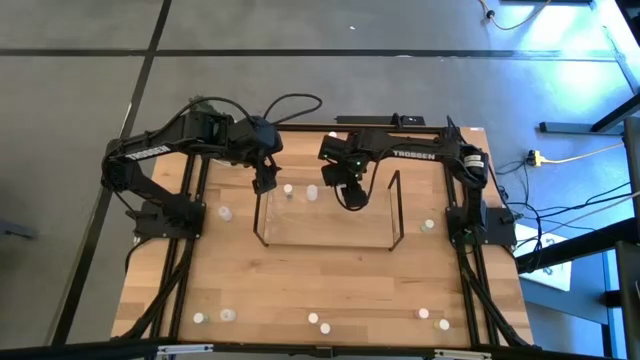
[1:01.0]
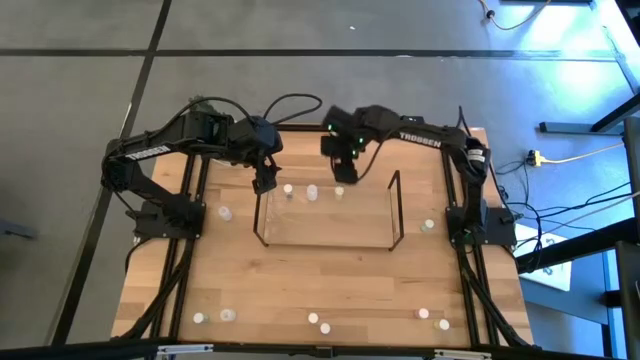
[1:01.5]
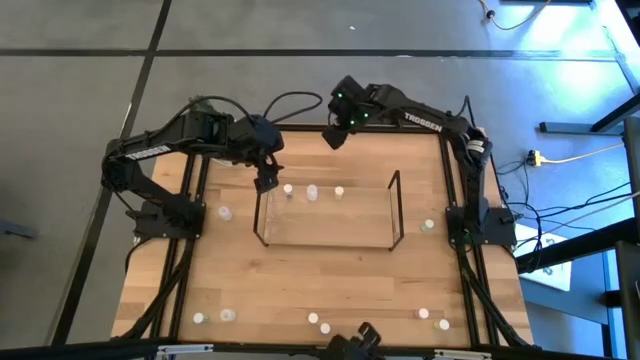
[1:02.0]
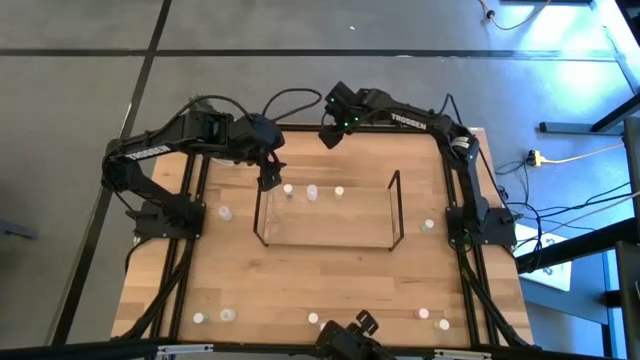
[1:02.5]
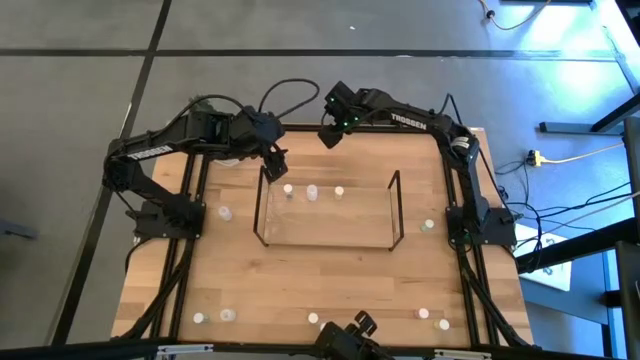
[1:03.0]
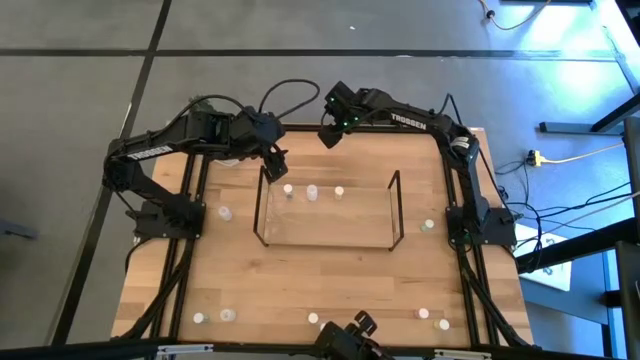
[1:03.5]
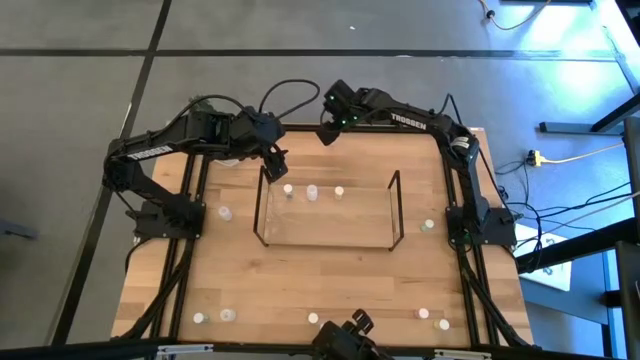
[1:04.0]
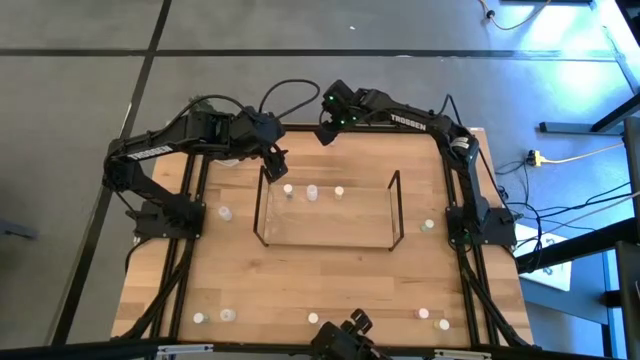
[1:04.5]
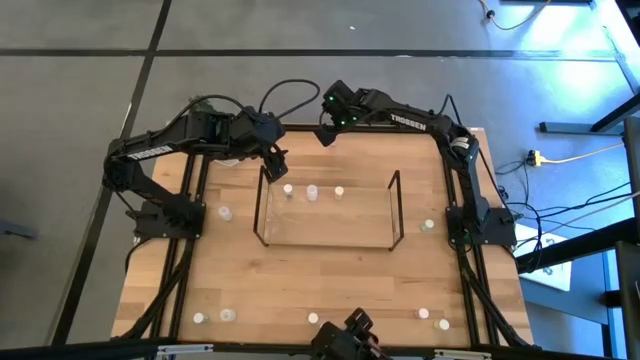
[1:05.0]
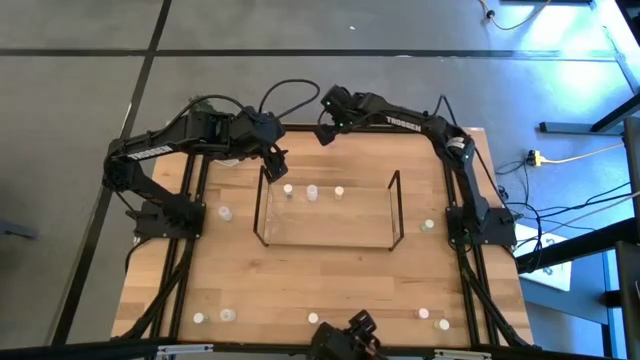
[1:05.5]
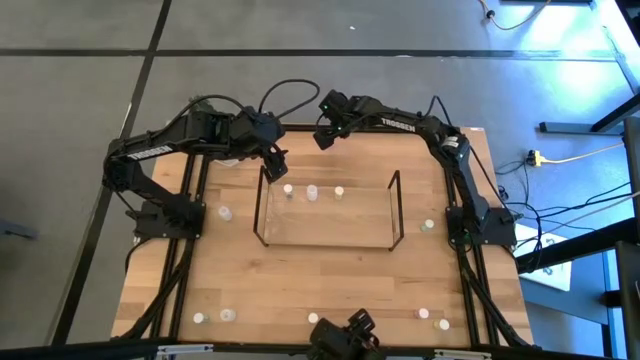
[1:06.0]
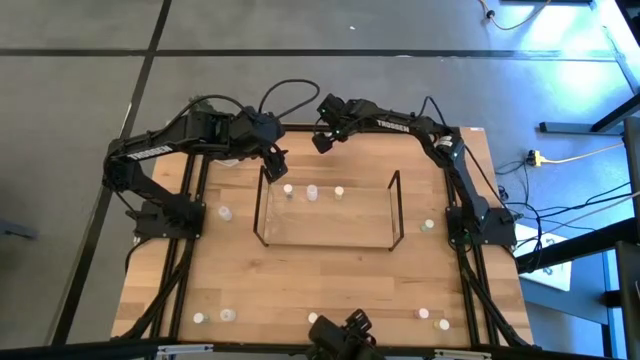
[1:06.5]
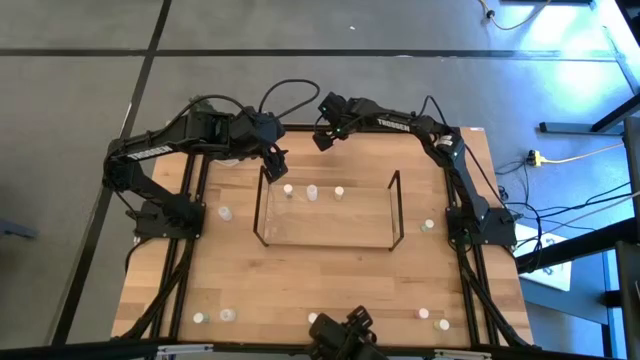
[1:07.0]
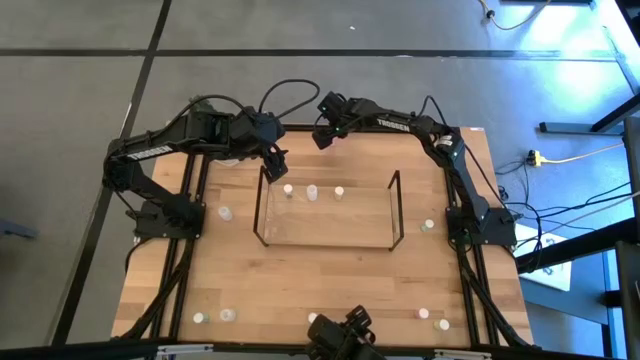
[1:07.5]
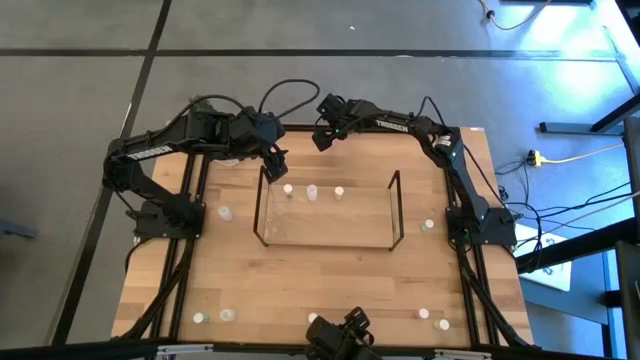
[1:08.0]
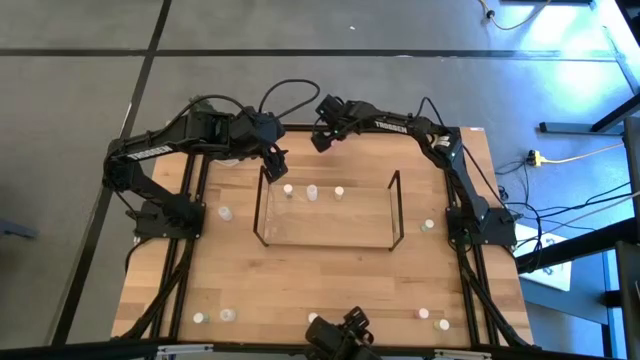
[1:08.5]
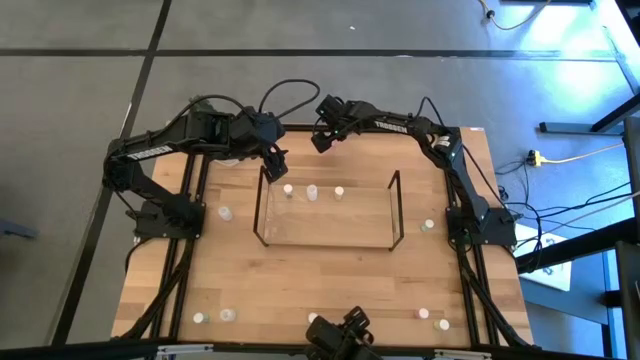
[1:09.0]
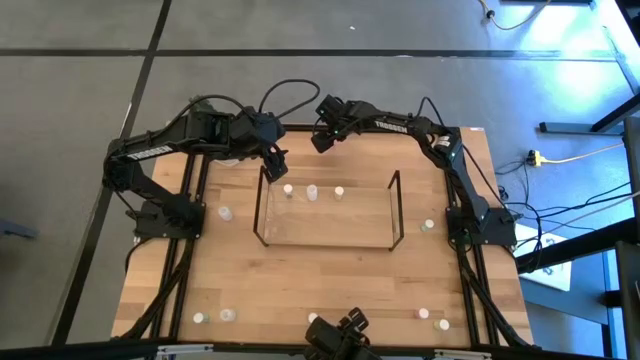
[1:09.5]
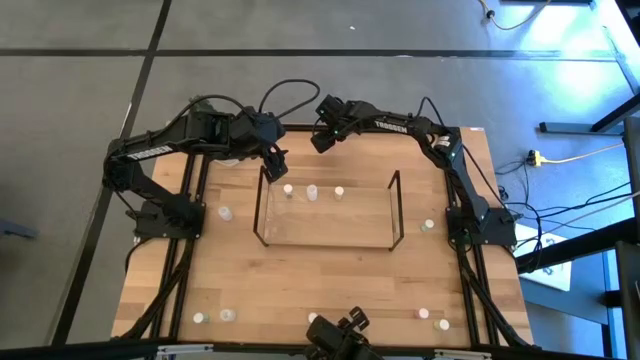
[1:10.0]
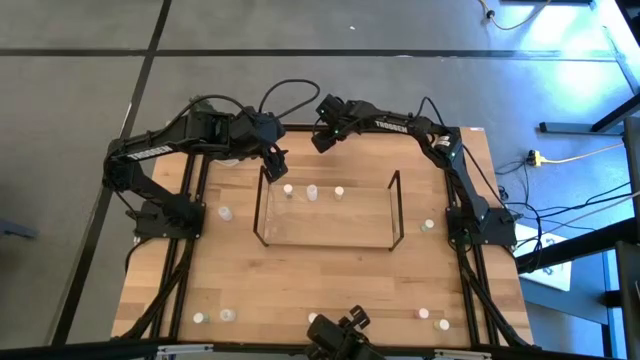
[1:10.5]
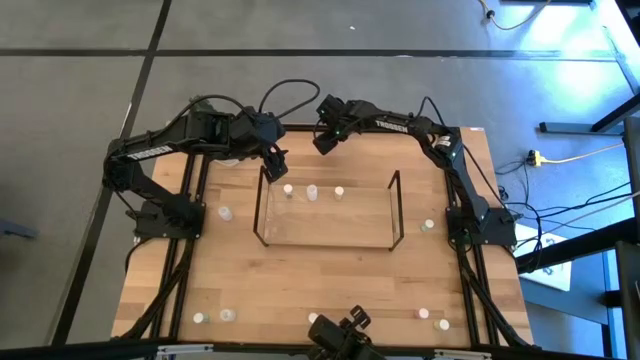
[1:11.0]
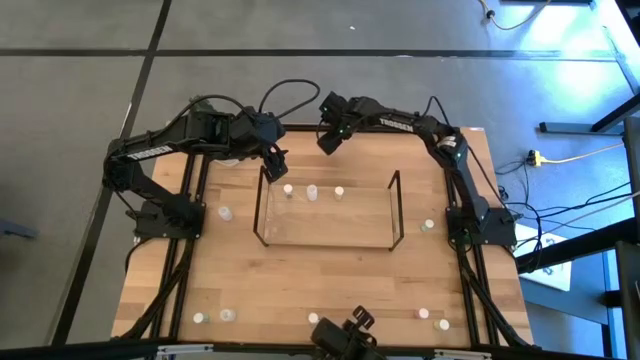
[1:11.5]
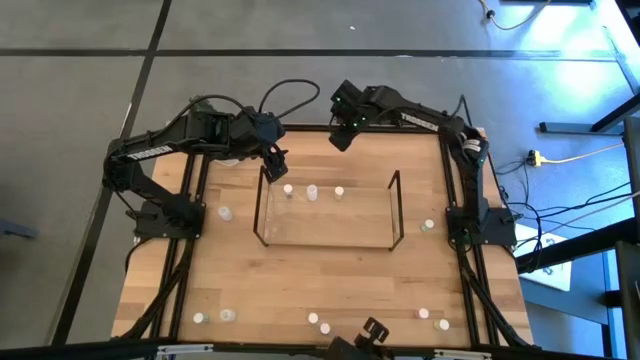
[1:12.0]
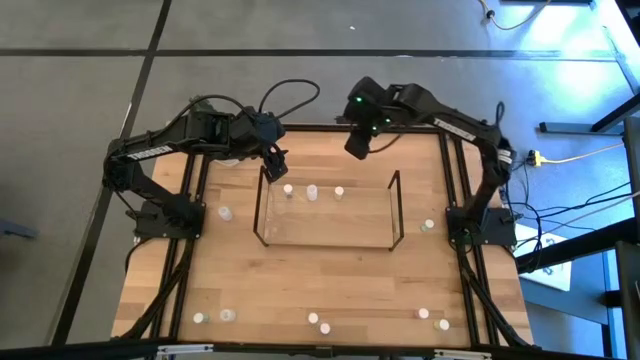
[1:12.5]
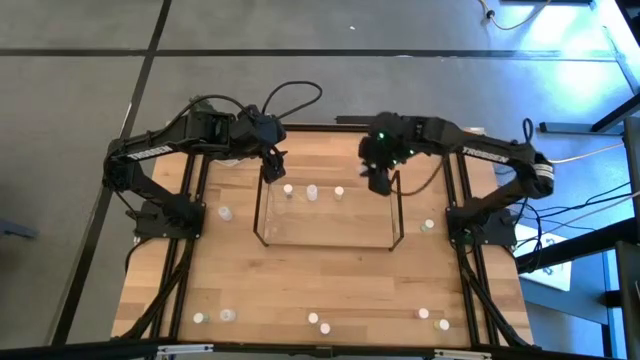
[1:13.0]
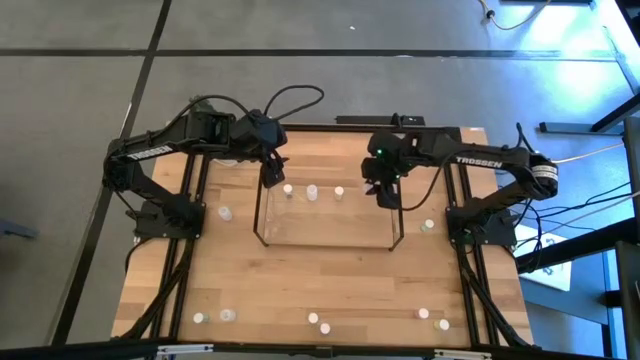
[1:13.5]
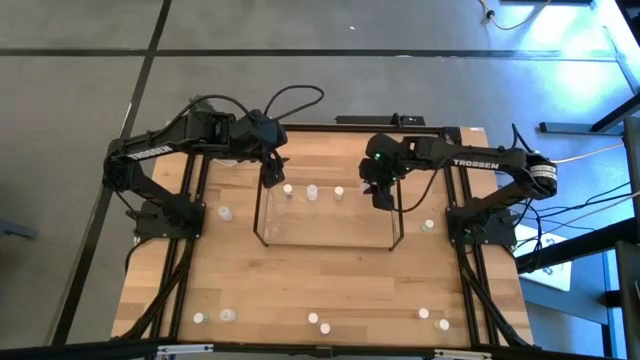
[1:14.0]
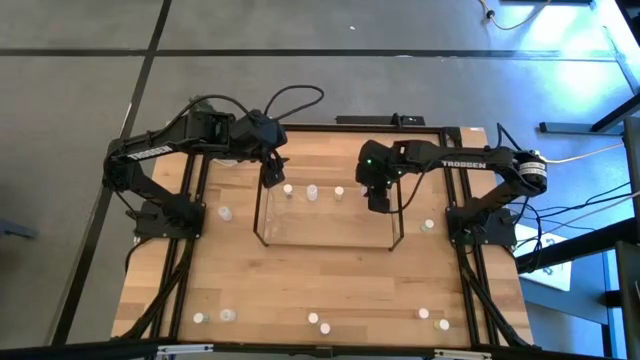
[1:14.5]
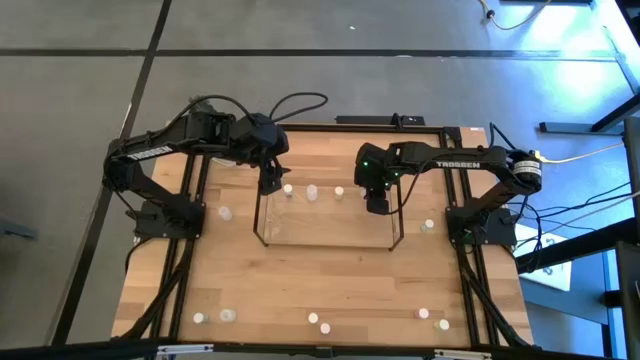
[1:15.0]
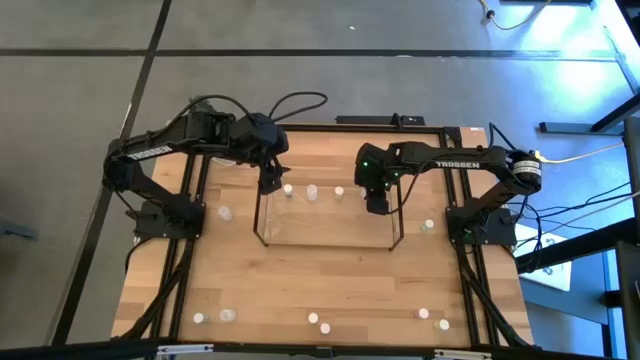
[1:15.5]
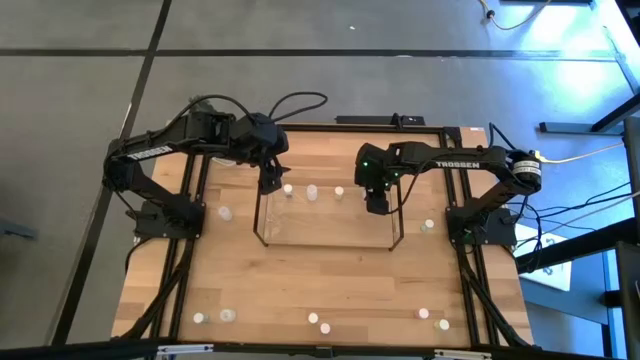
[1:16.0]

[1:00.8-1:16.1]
Task: Pick and place medicine bottles onto shelf by color
Put the top pink pill bottle on the shelf

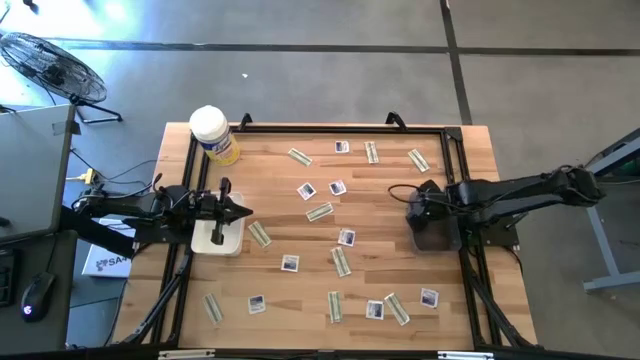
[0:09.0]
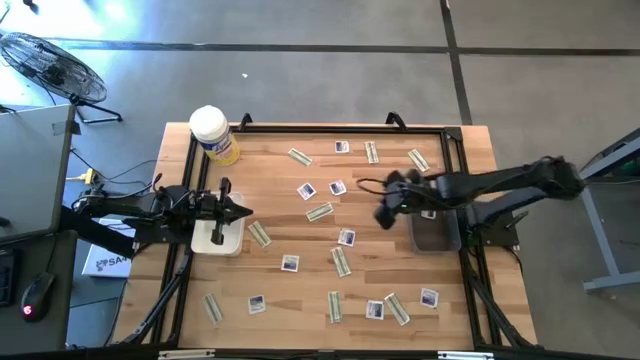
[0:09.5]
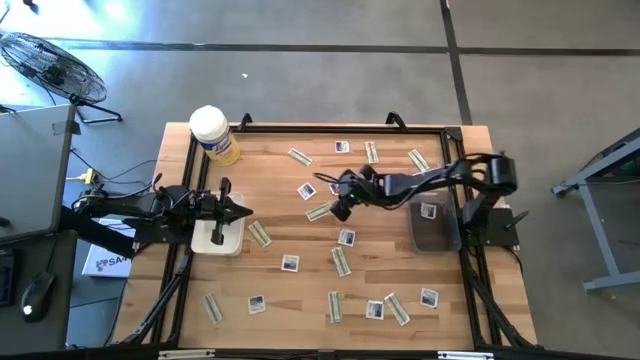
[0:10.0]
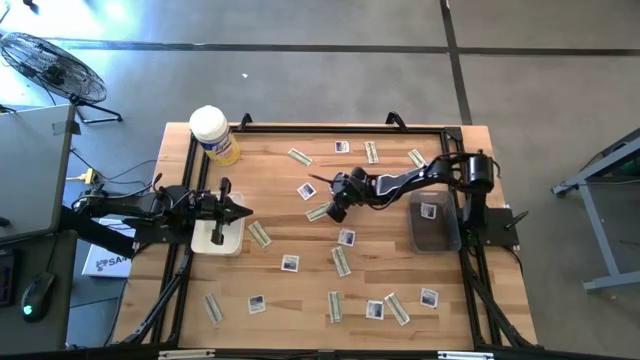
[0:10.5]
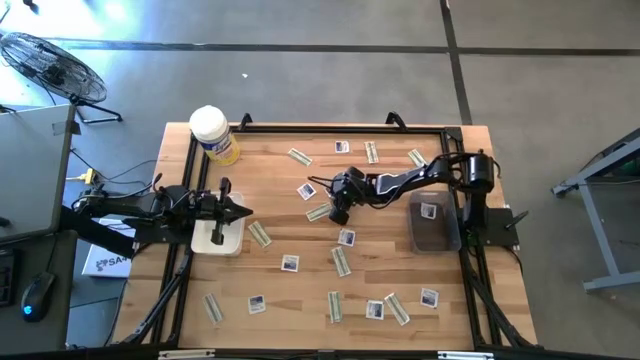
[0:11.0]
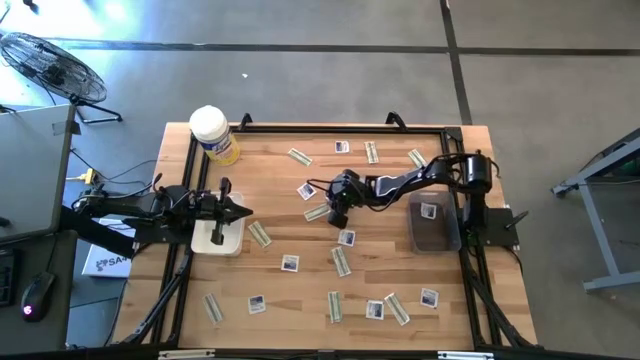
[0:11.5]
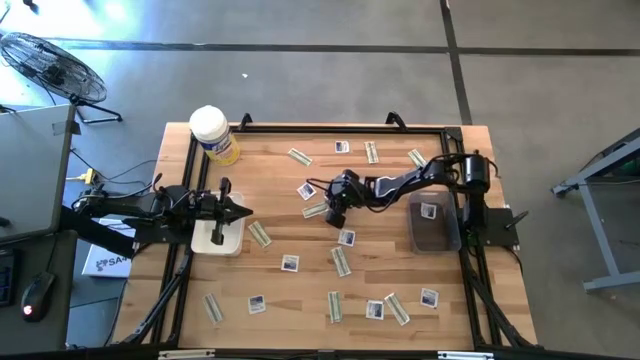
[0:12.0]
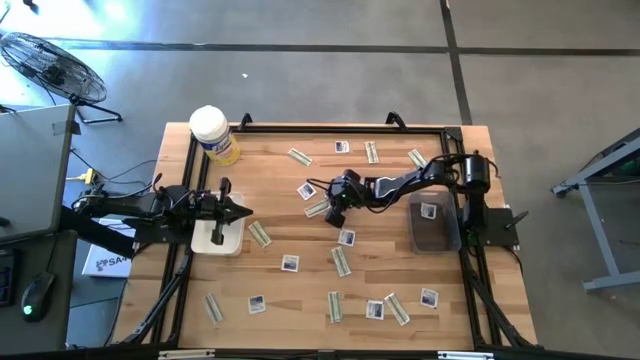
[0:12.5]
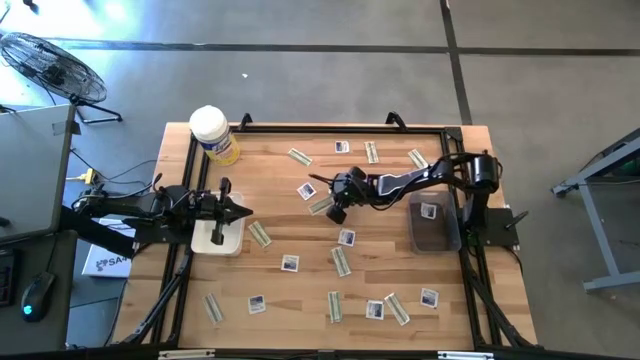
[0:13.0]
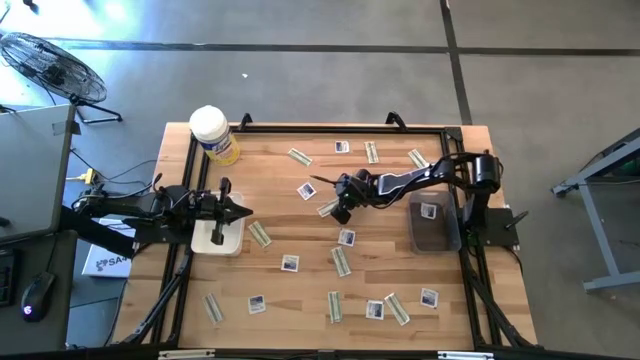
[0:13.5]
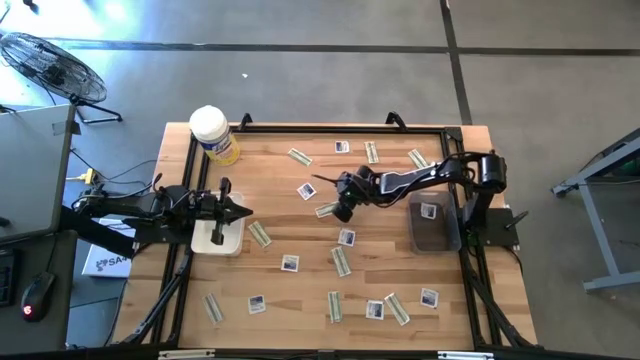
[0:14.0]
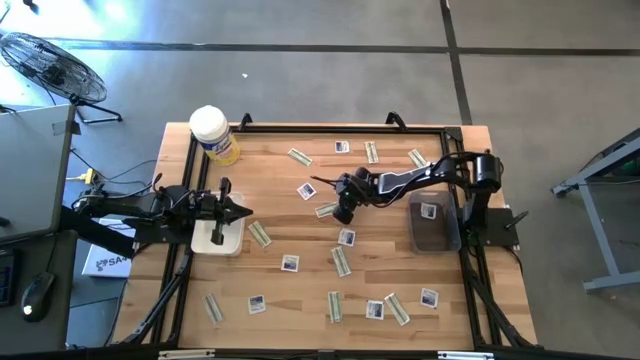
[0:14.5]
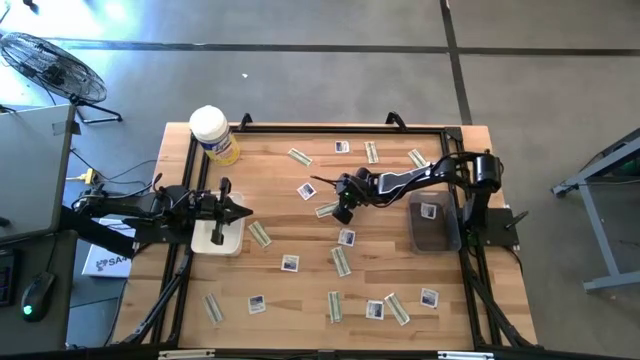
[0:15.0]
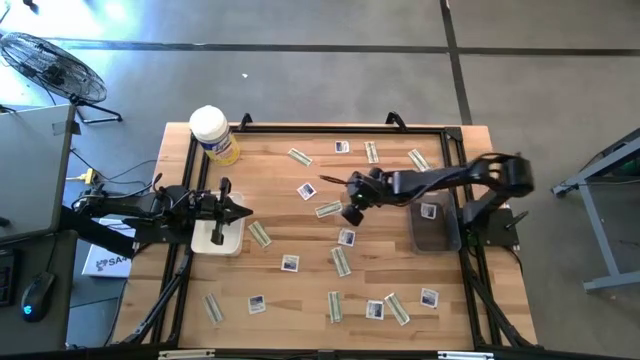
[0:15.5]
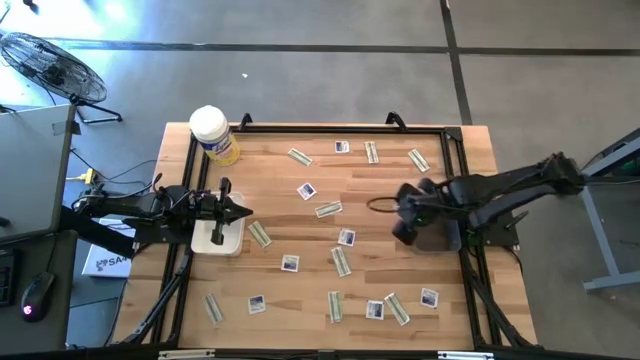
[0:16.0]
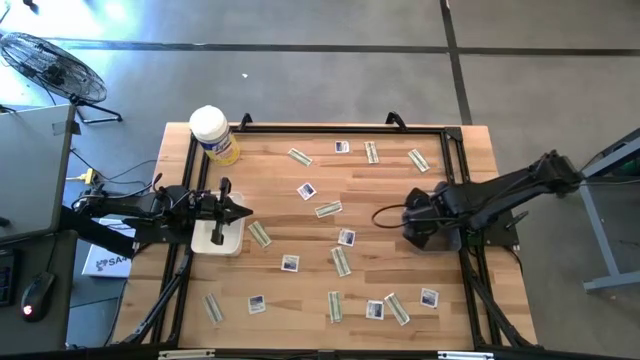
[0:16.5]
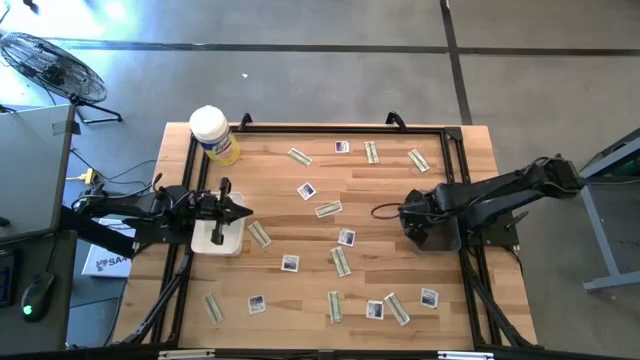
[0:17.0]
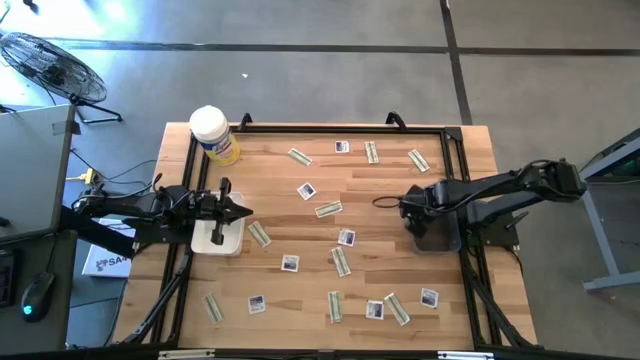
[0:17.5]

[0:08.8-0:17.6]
Task: Pick & Place First Aid Supplies
Put the blue alcohol pad into the black bin
